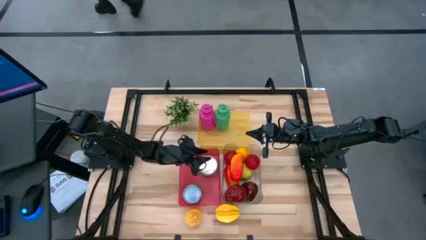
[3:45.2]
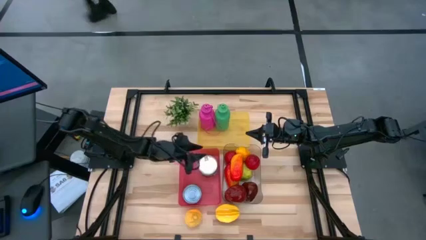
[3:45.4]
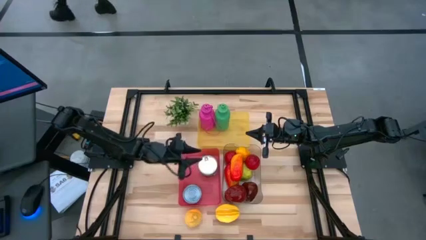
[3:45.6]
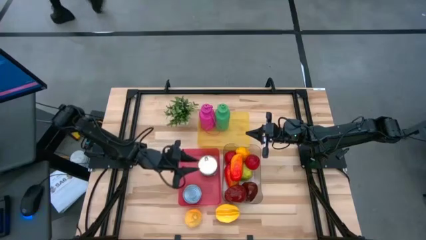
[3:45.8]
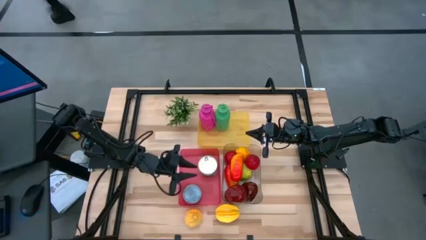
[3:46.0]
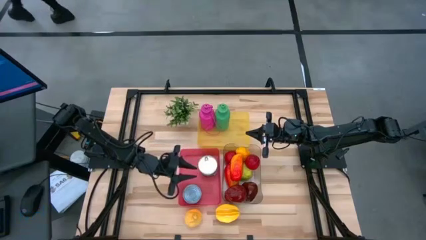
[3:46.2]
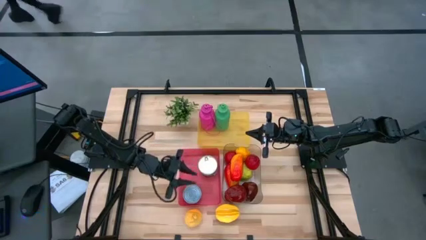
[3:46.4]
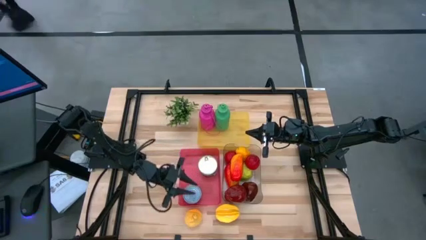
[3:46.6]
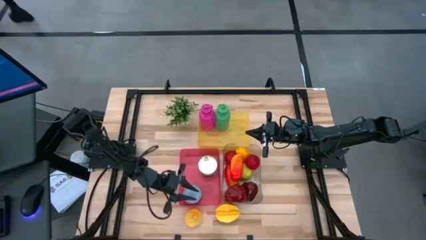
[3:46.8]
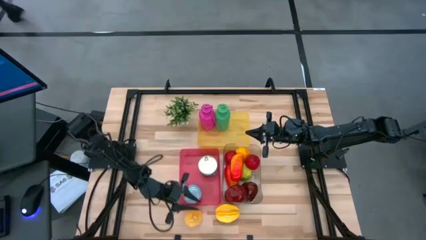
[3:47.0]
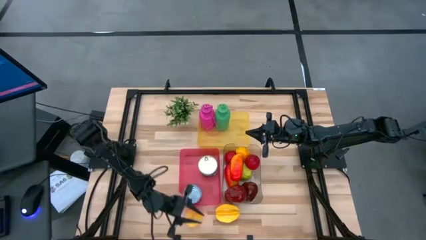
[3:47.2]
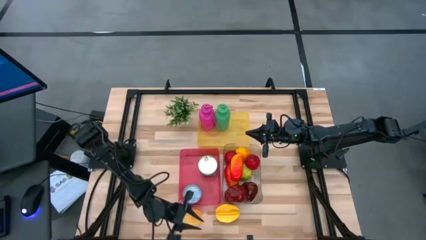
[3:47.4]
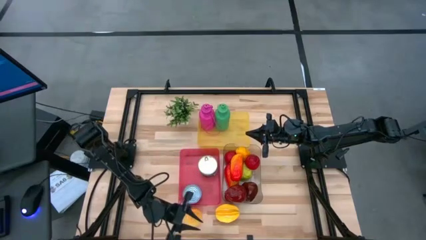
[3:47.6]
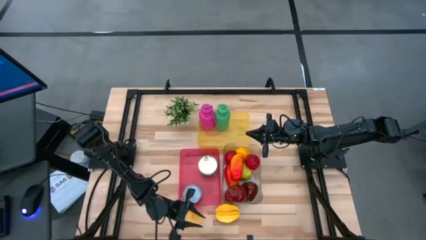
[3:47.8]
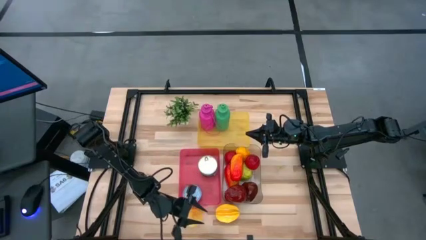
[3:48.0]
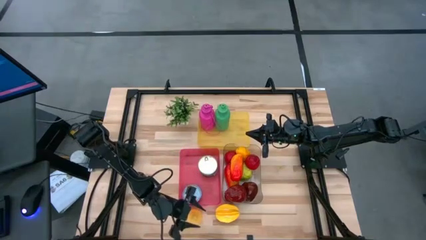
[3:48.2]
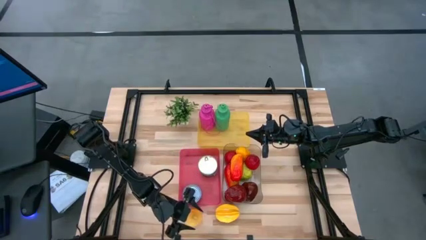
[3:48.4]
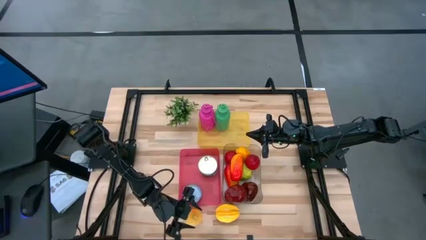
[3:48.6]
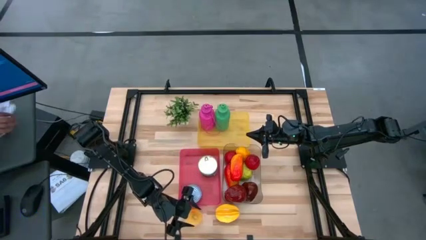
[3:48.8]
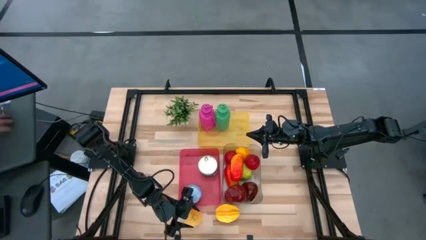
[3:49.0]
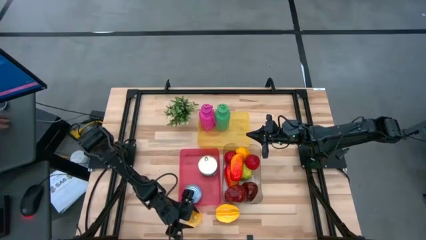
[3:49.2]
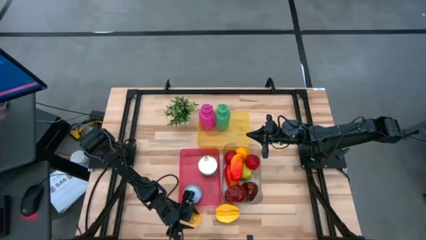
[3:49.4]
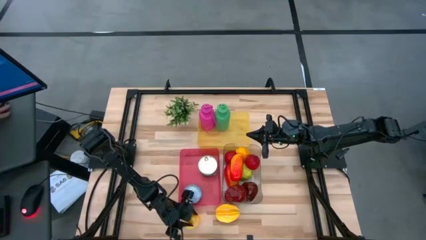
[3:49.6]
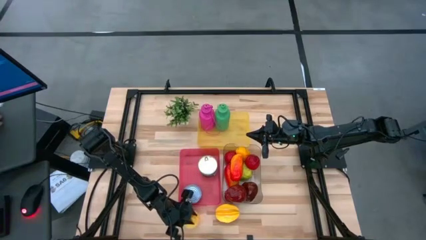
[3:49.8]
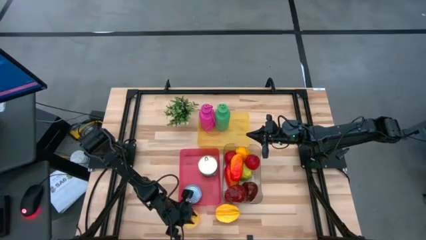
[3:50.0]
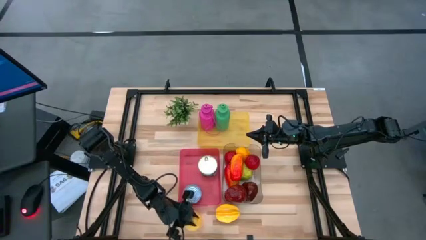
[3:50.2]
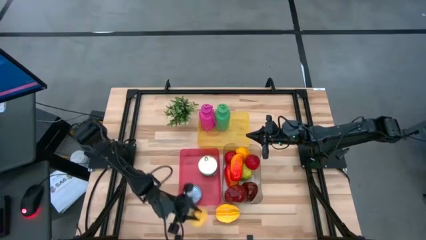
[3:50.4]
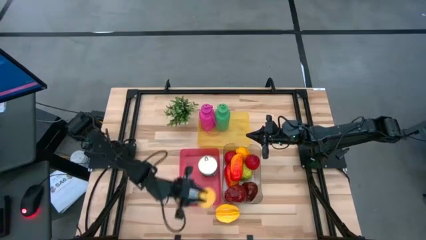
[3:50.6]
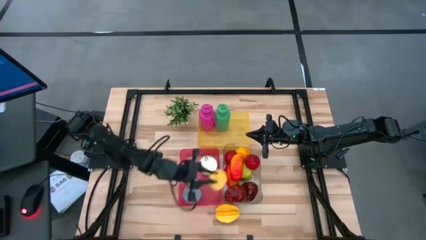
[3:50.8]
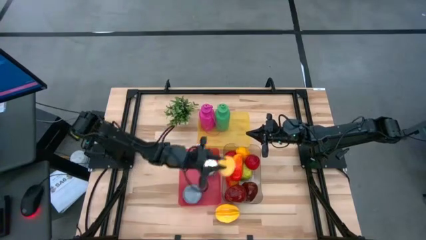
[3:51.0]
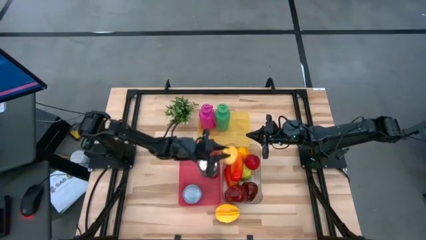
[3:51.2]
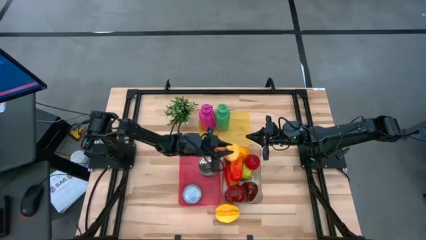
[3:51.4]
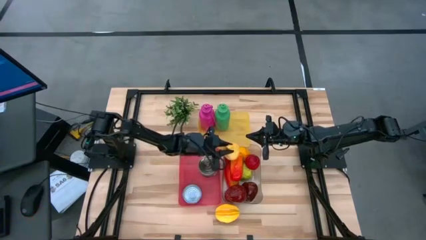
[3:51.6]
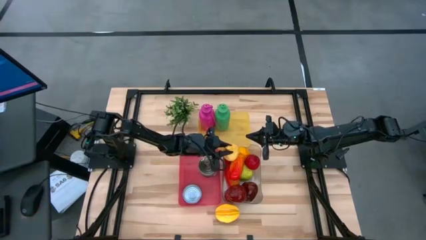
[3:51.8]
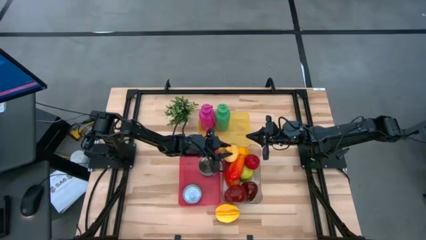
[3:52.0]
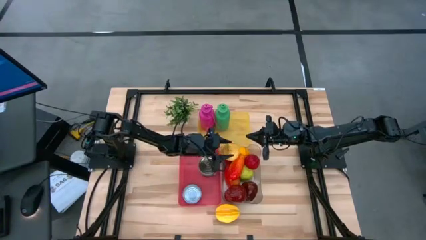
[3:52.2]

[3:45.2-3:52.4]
Task: Pick & Place Food Item
Put the pear into the transparent bin

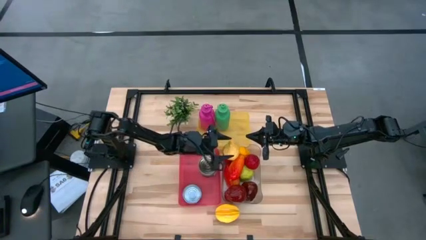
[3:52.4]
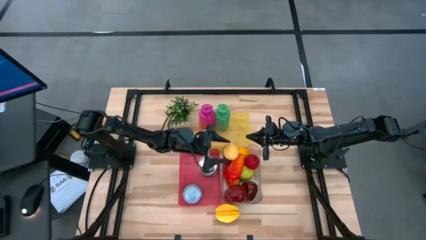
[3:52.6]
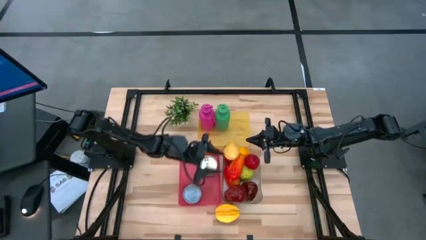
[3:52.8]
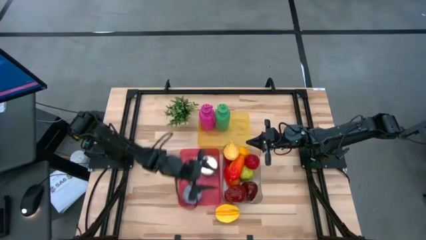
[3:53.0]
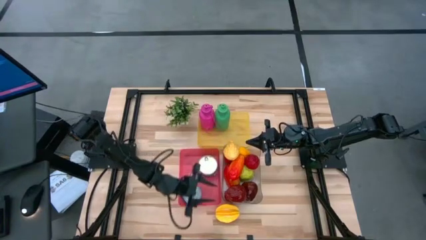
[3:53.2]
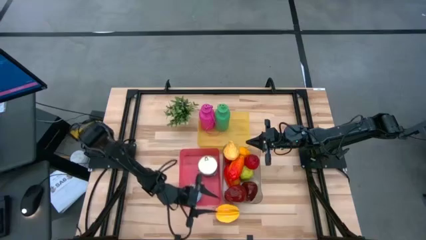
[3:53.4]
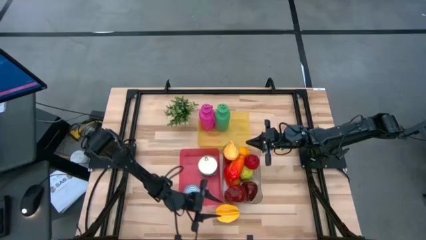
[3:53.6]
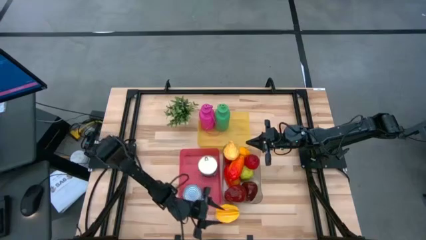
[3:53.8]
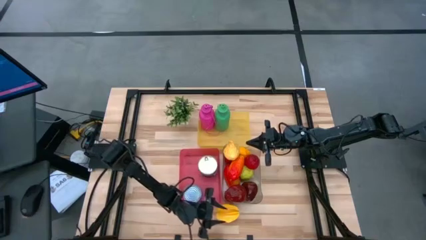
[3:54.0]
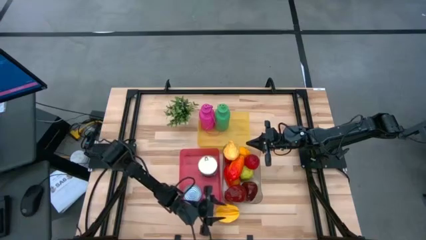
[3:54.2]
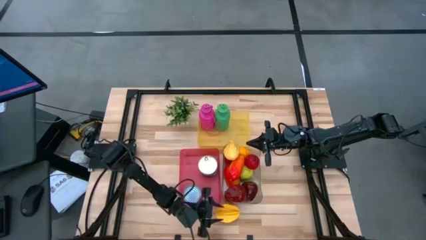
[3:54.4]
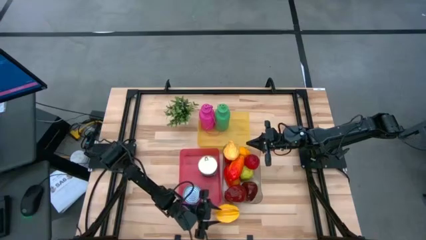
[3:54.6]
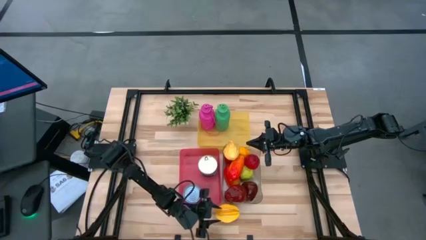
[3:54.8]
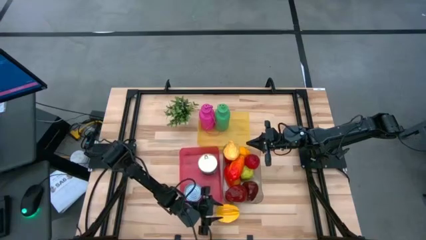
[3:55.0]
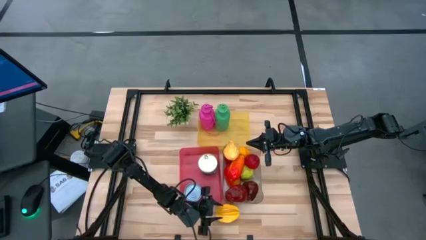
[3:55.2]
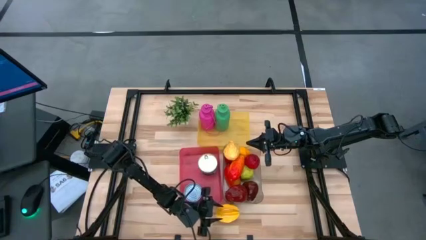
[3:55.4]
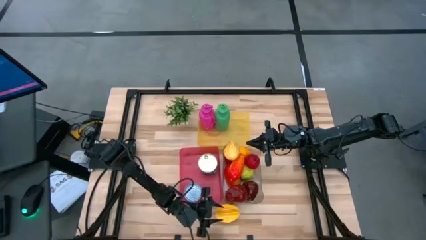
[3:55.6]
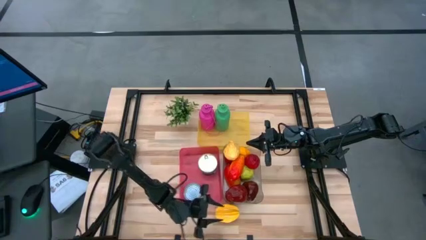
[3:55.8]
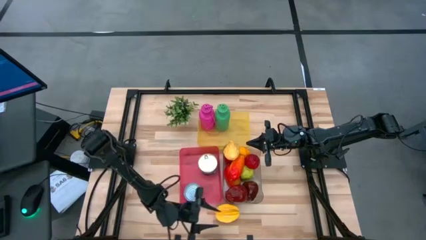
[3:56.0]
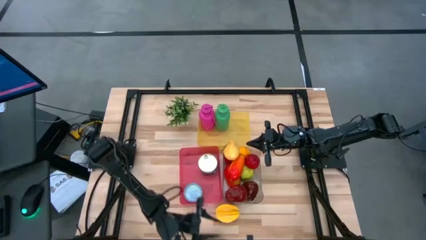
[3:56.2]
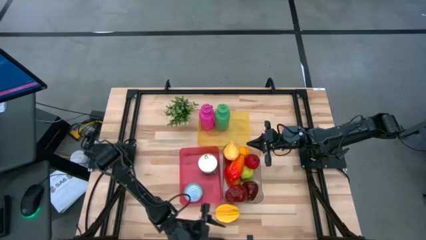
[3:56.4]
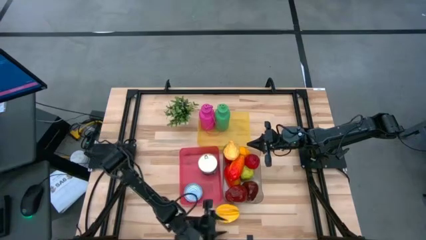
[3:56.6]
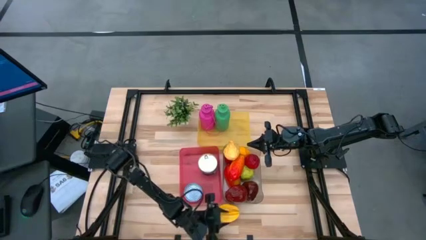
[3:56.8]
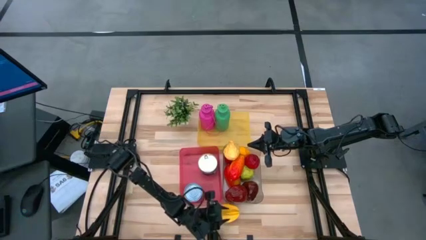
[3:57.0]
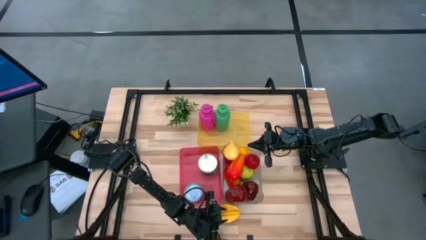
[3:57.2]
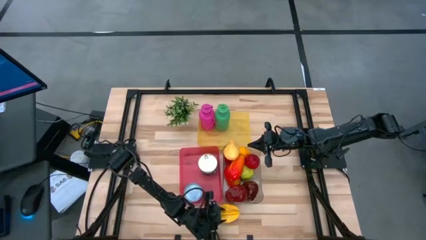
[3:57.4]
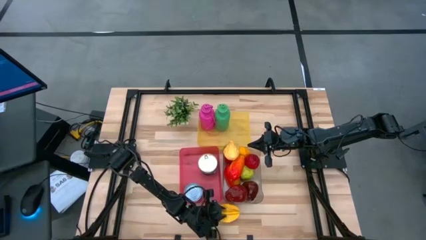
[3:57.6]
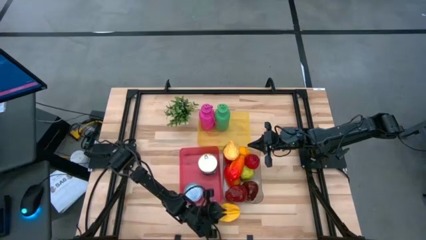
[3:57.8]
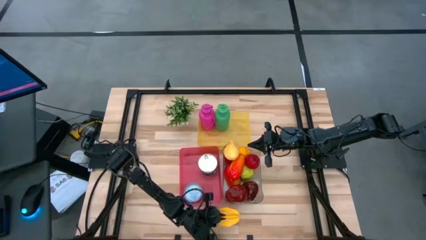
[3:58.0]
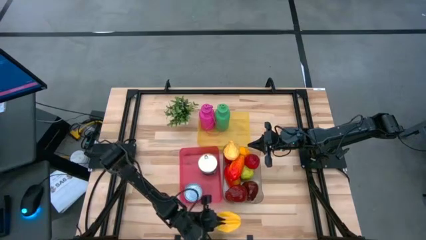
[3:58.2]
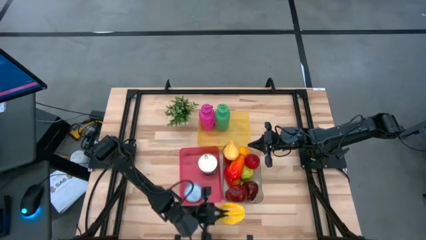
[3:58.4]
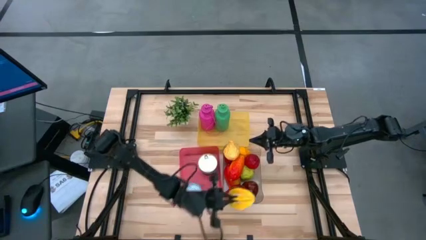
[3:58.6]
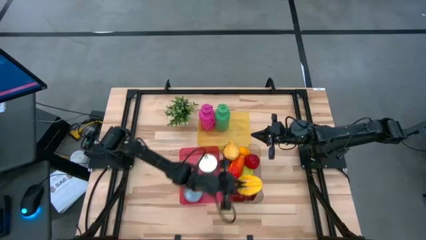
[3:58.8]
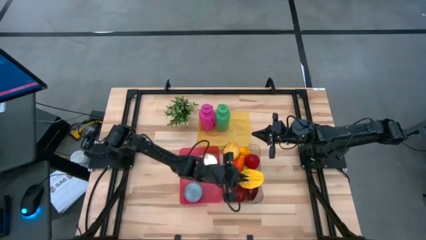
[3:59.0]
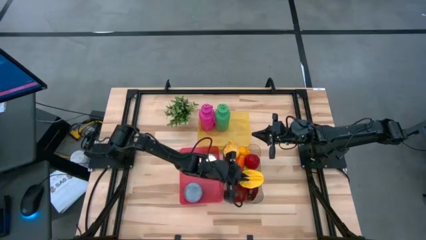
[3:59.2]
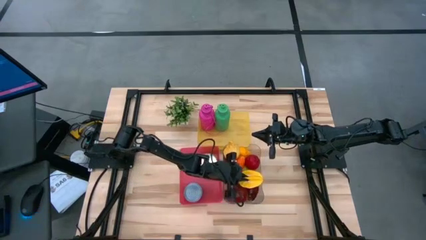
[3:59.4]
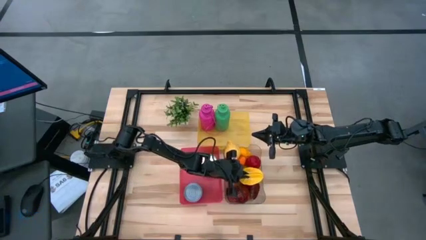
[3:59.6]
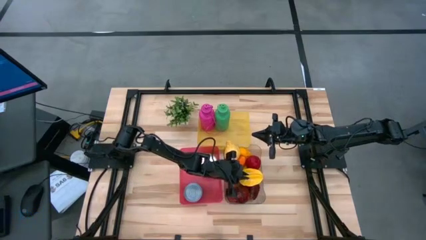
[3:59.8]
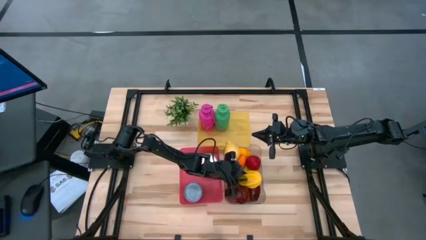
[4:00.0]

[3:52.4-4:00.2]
Put the starfruit into the transparent bin
